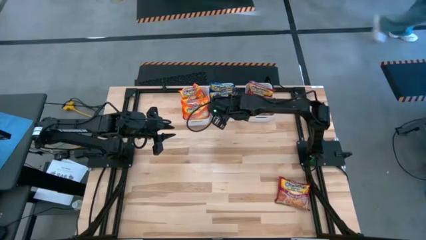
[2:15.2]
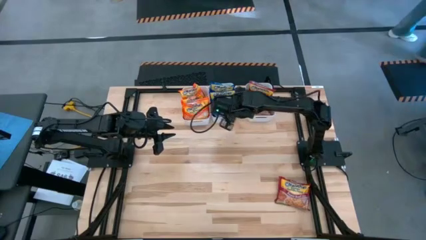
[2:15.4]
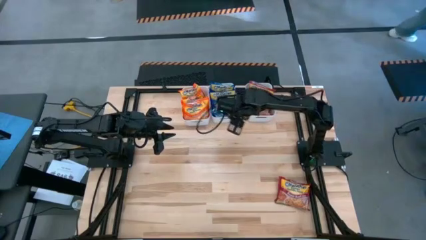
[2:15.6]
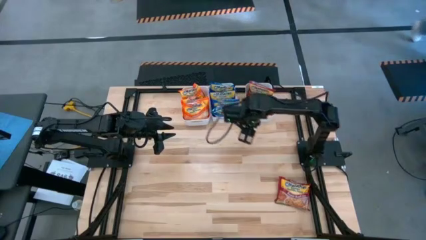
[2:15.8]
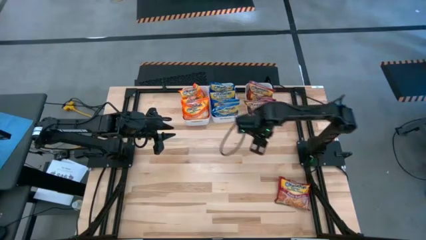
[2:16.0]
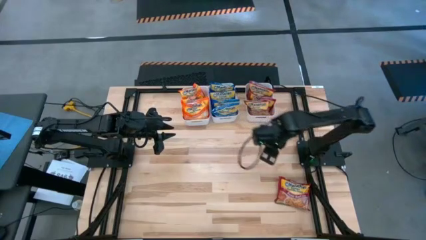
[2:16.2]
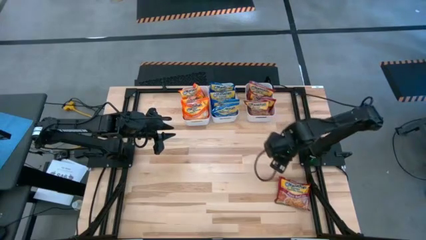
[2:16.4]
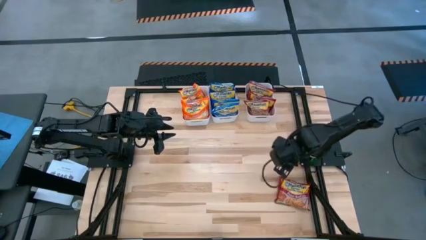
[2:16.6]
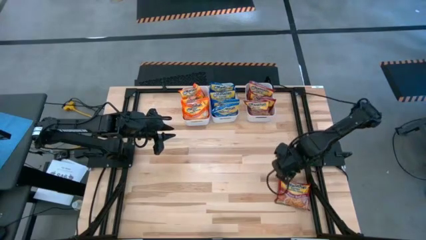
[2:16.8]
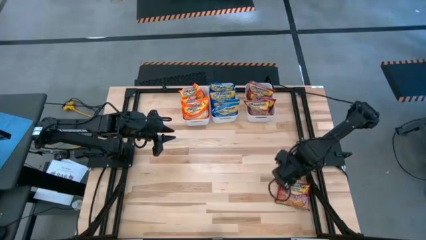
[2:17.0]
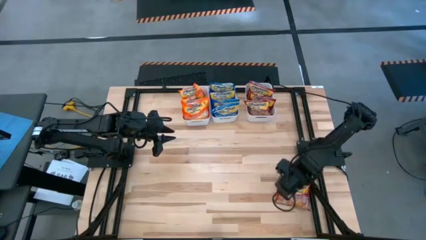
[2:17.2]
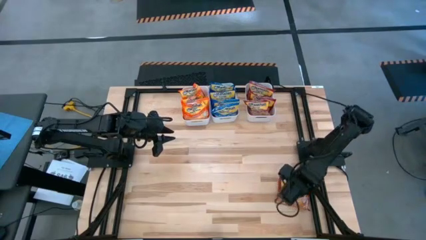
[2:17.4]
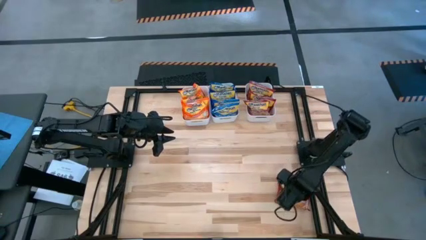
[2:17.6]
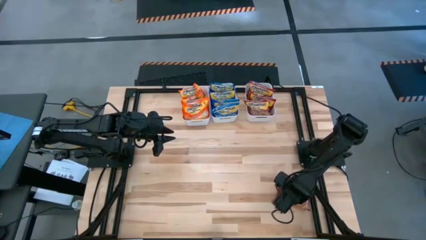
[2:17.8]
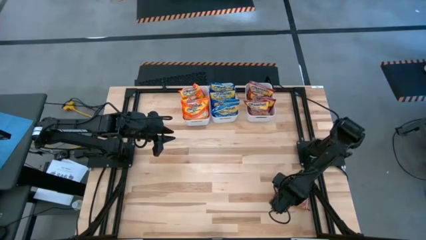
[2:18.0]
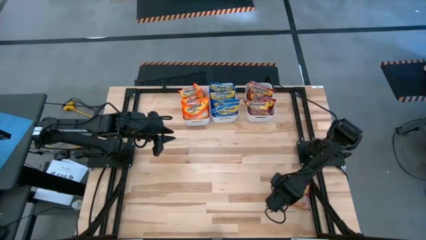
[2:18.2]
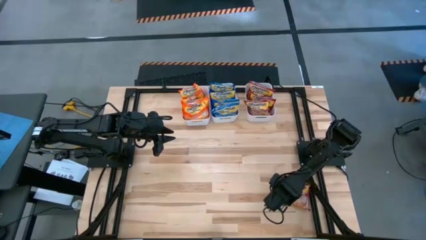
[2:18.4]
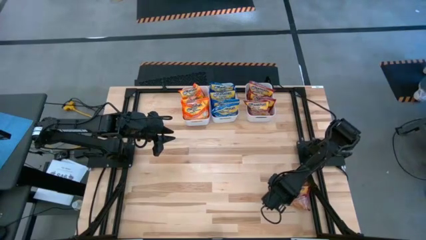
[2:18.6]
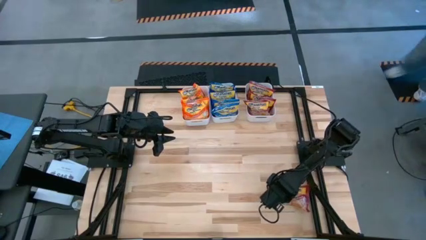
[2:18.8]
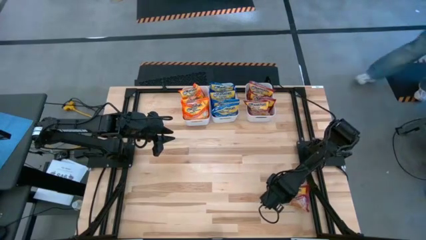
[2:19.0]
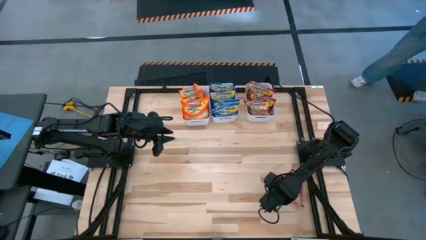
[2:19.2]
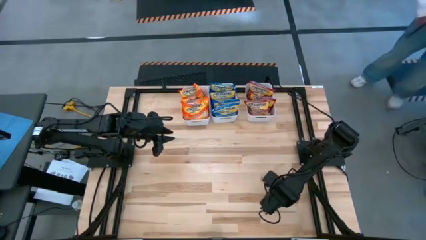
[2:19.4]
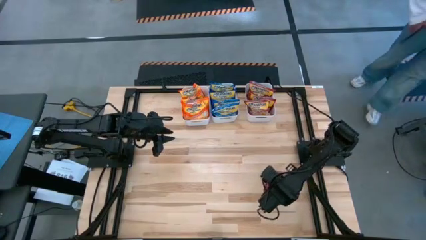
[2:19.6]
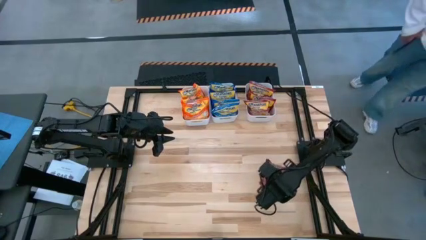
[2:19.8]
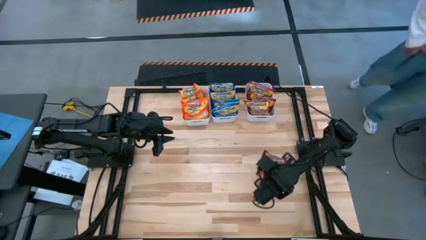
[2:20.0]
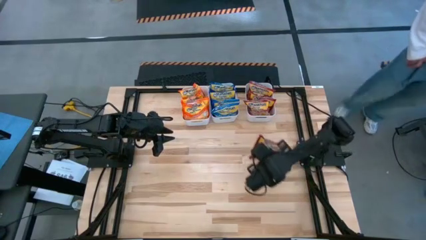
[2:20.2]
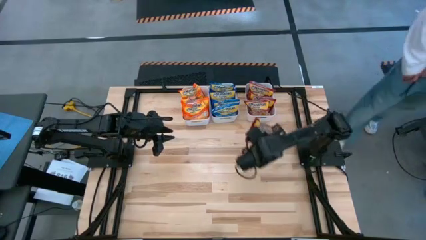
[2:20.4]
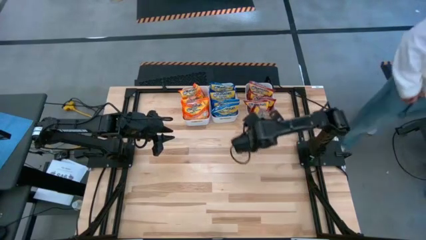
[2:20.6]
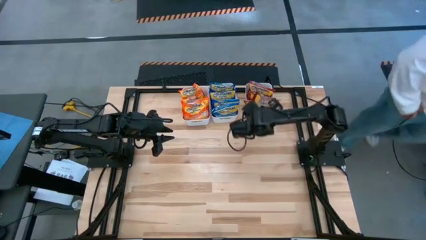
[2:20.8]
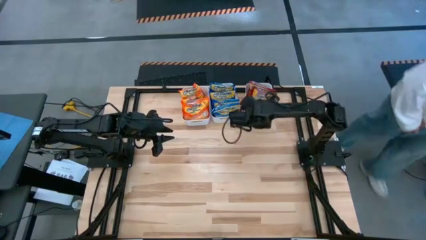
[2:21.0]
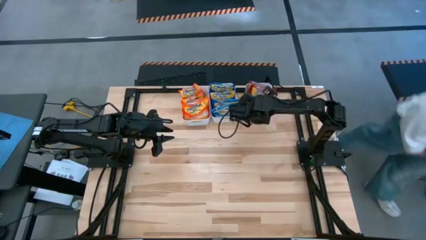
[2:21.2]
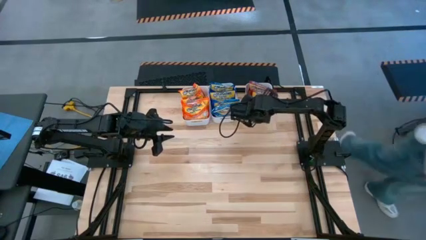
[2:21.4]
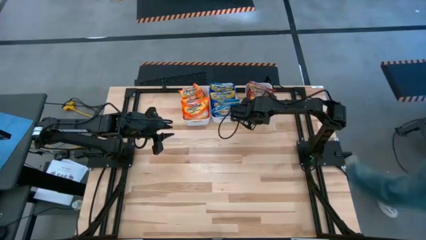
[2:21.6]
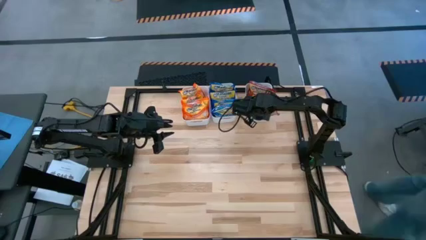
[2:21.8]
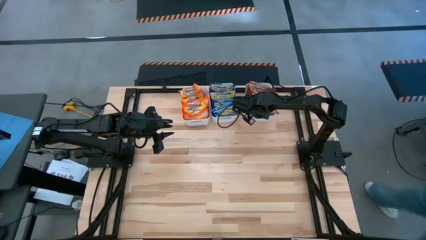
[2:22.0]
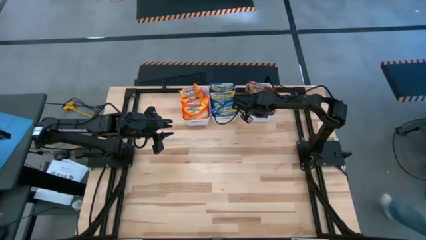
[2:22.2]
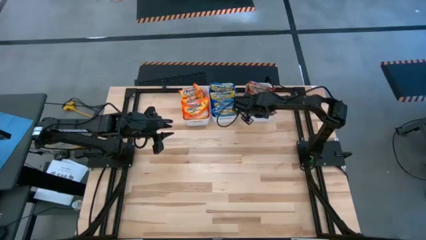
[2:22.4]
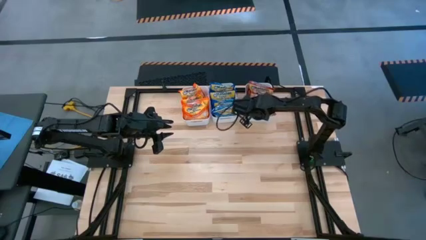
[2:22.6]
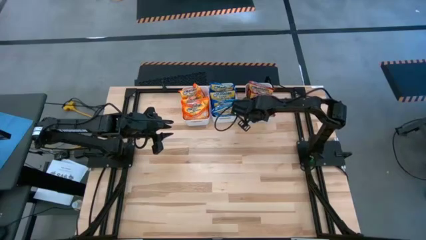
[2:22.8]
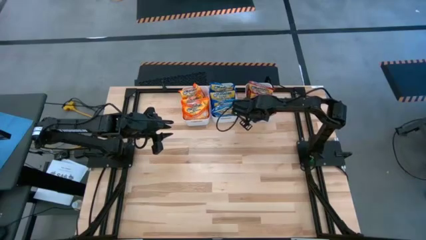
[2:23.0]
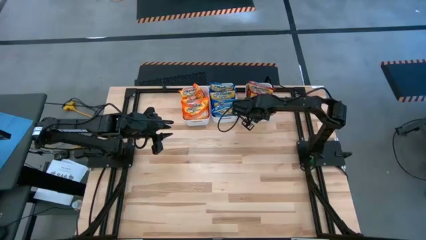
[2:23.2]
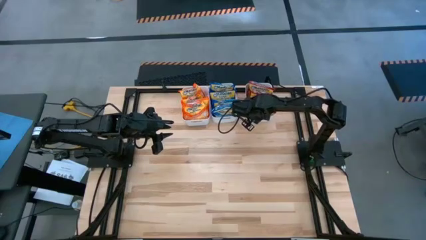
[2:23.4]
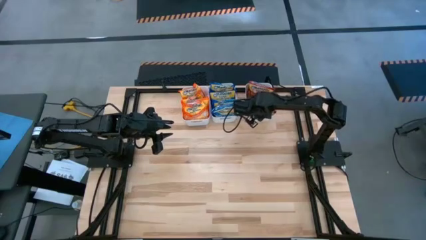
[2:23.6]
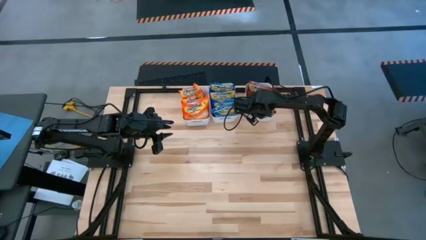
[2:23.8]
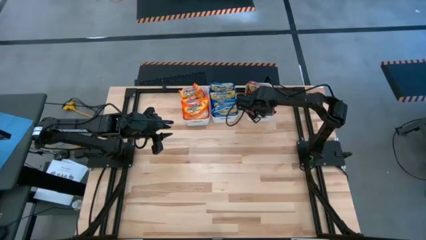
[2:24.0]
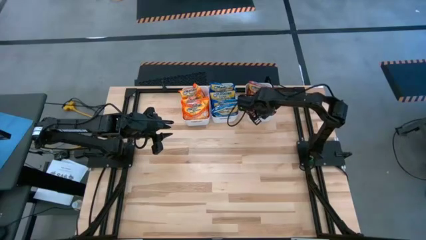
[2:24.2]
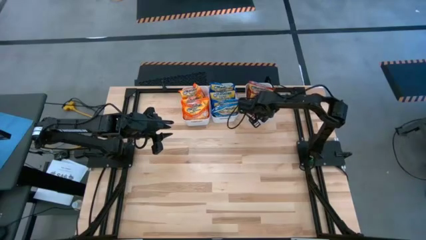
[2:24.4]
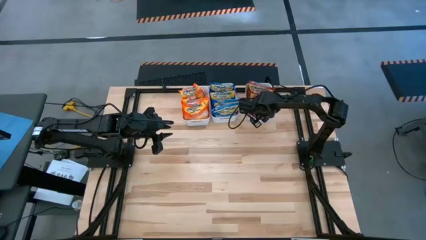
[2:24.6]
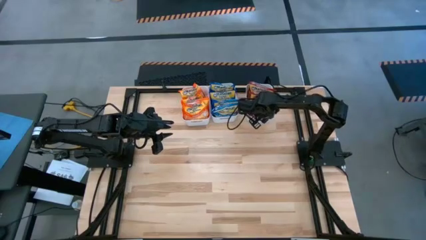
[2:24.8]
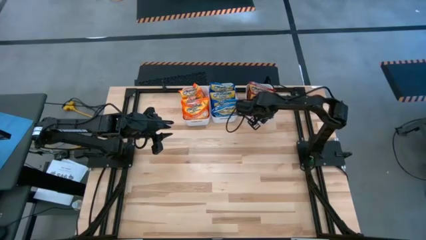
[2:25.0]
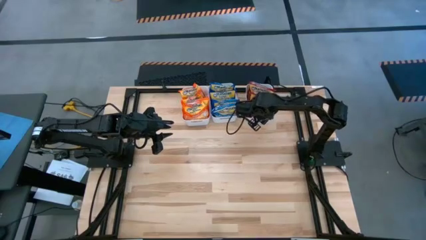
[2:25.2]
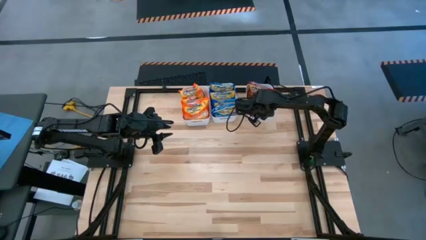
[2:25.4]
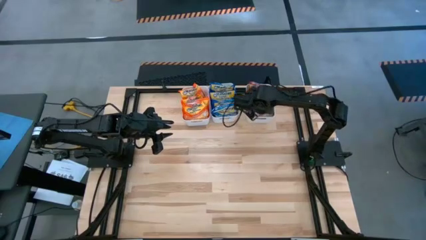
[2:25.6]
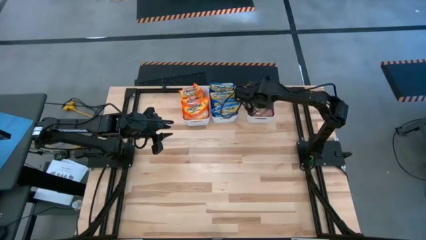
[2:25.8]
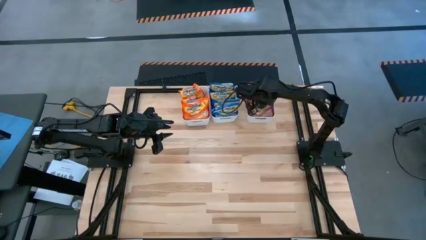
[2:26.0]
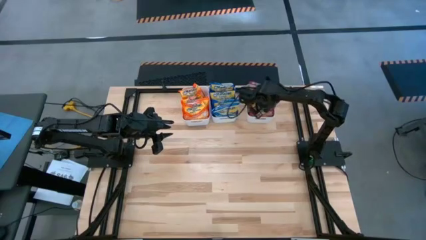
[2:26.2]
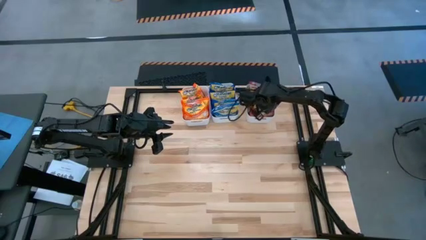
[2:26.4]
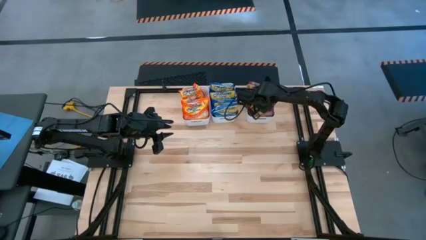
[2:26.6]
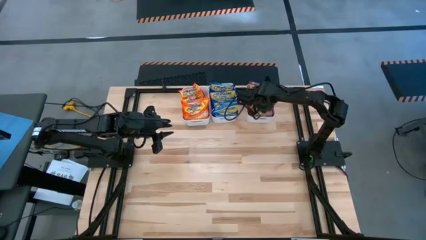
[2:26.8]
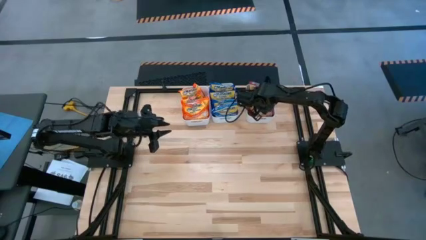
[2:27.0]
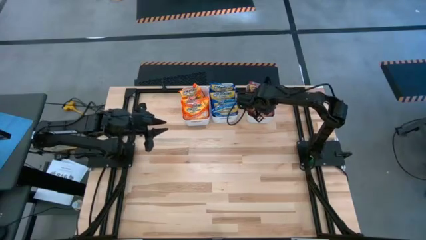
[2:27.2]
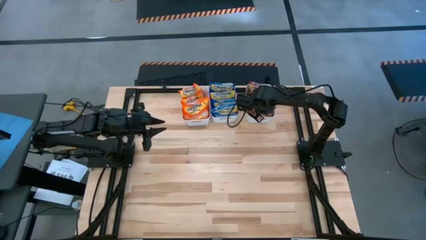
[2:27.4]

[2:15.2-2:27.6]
Task: Sort Maruchan noodles
Put the red noodle pack into the right white bin

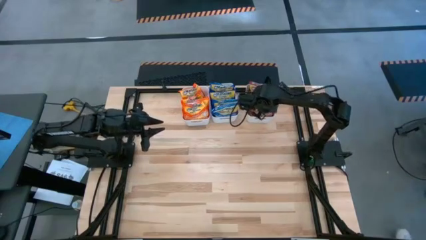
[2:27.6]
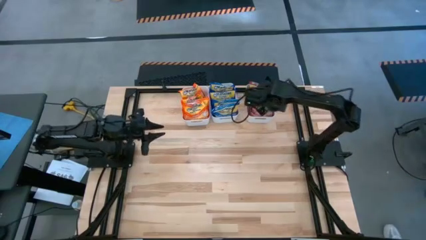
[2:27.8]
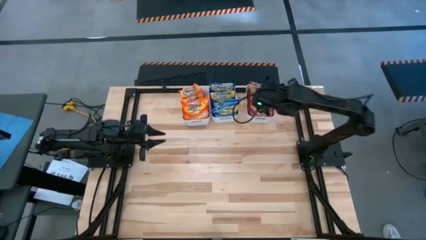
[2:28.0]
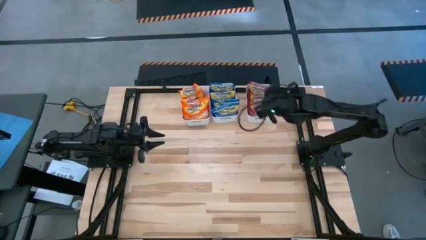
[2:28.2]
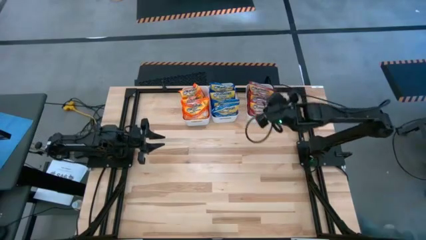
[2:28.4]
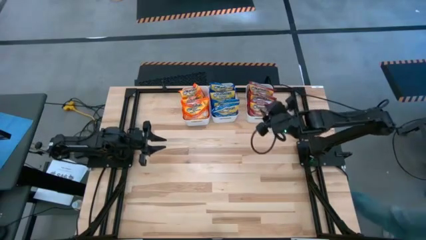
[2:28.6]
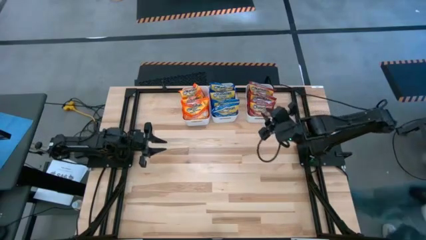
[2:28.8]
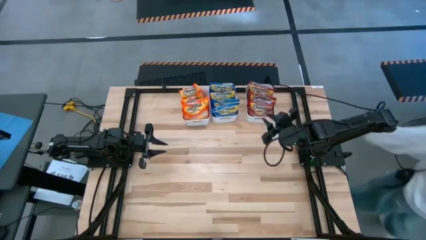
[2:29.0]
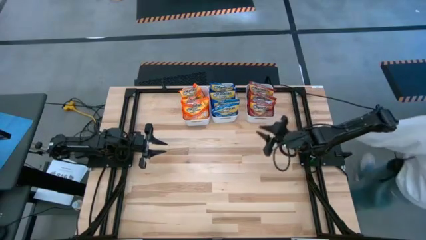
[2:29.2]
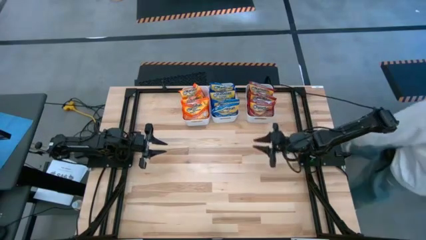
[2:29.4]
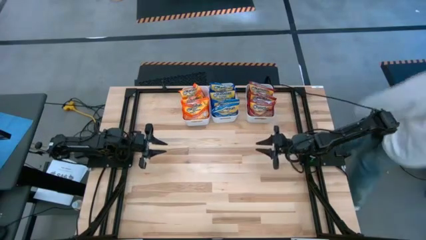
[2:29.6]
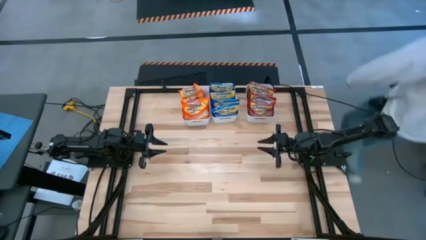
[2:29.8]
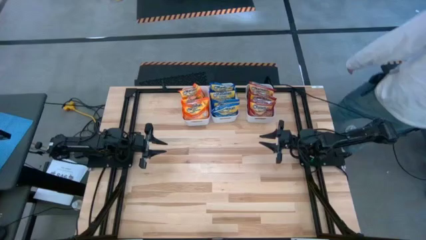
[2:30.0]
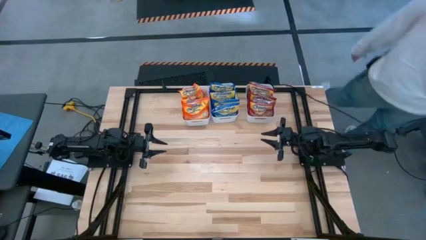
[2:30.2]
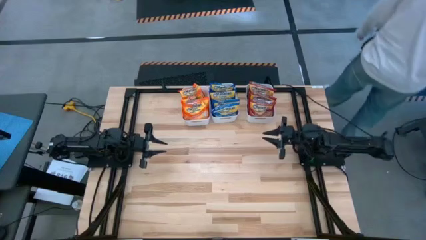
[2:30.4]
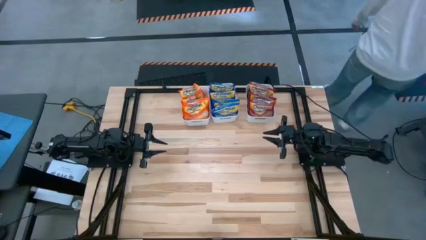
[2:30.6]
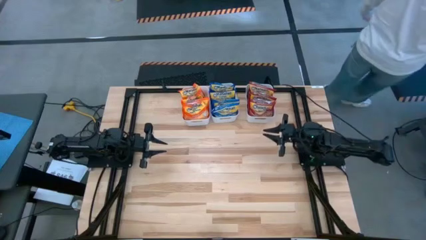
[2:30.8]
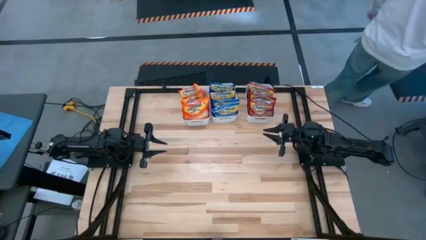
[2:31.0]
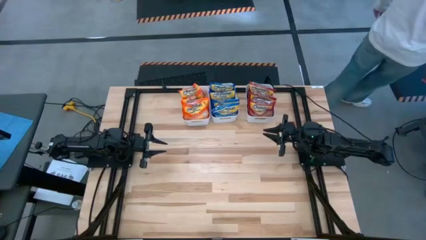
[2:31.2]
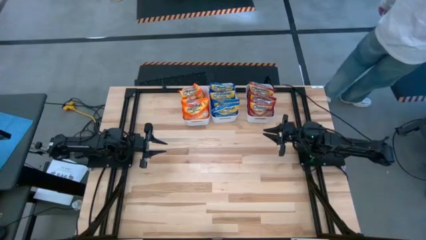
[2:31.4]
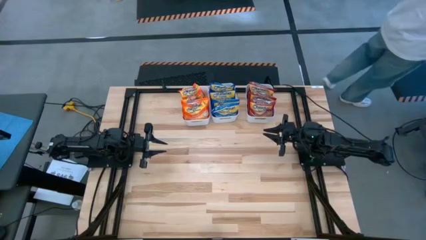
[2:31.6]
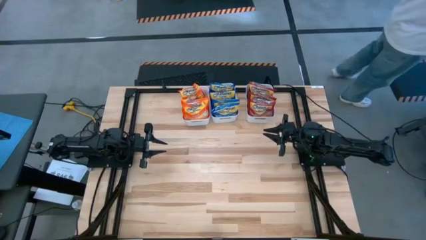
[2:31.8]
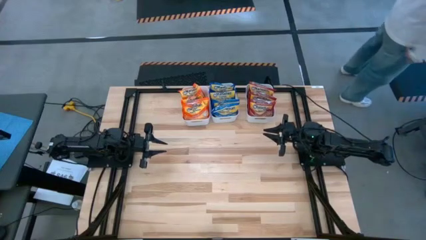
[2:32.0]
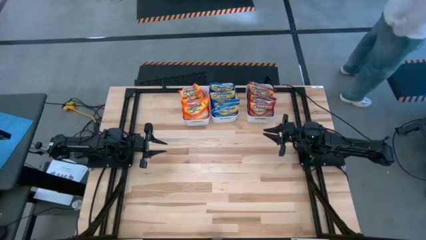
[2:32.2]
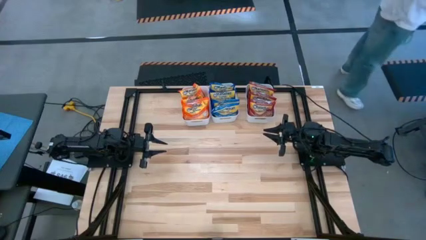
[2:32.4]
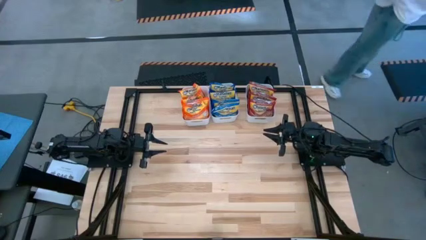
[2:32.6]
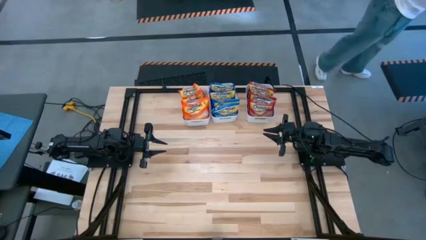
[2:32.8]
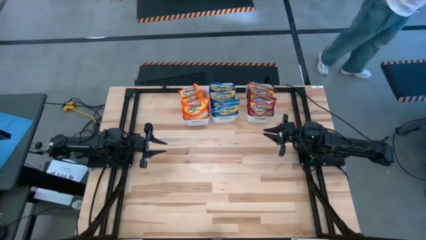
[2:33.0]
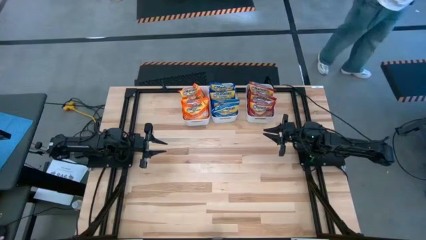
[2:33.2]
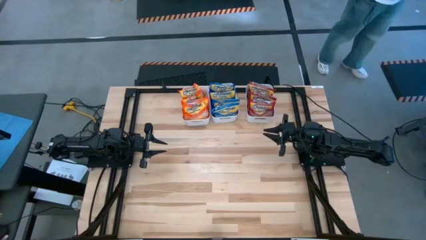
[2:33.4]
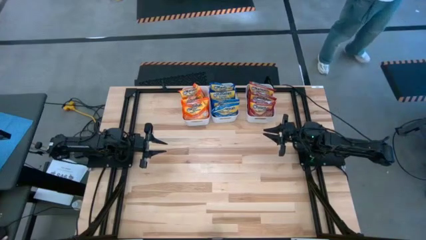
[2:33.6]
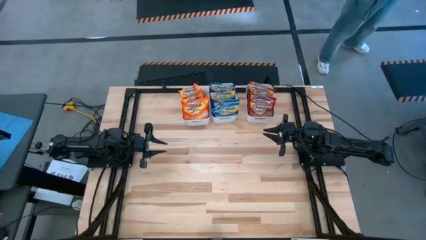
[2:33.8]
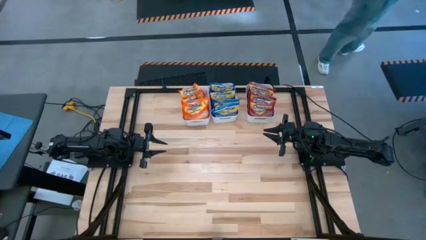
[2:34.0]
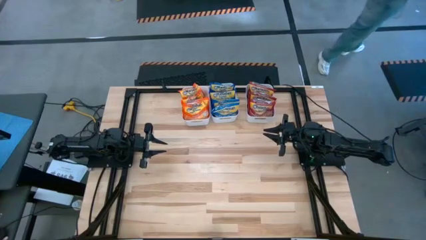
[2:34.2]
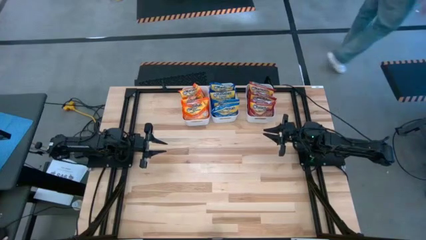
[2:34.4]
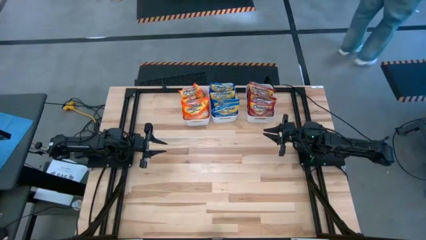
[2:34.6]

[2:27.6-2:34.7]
Return to Home Position
